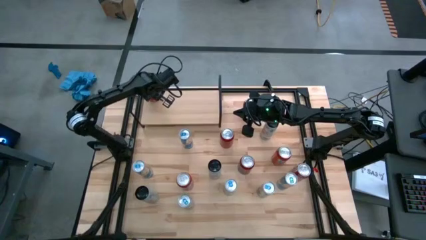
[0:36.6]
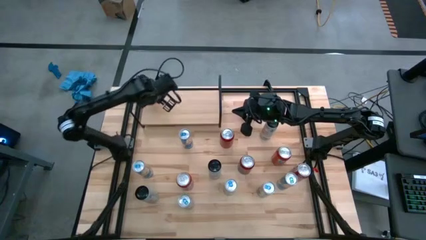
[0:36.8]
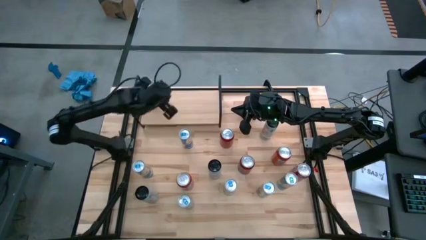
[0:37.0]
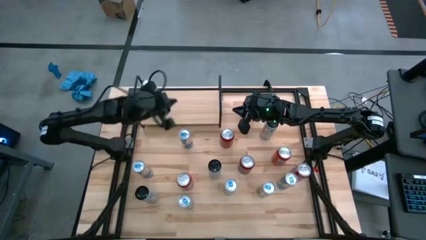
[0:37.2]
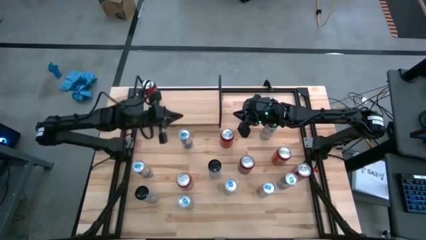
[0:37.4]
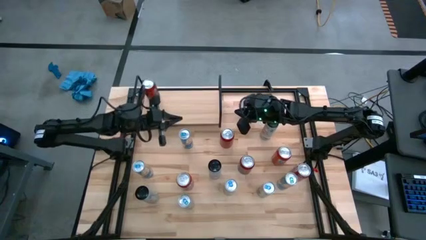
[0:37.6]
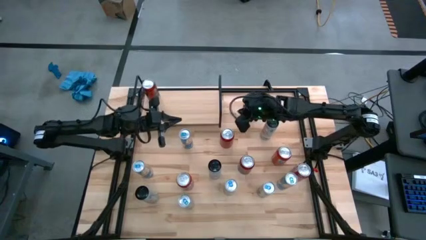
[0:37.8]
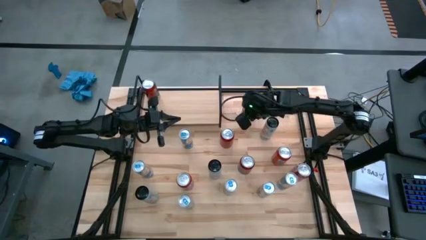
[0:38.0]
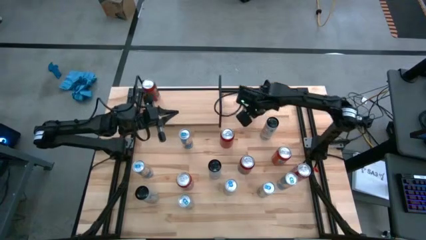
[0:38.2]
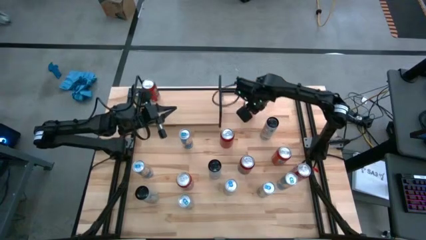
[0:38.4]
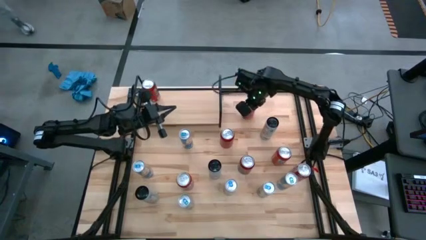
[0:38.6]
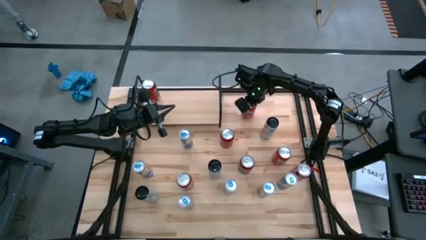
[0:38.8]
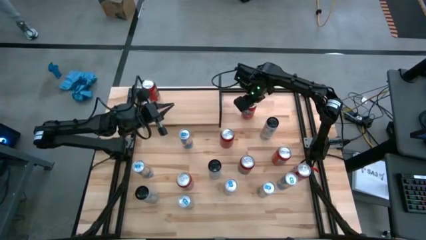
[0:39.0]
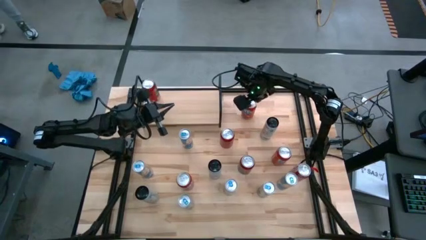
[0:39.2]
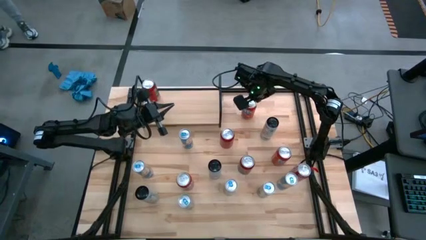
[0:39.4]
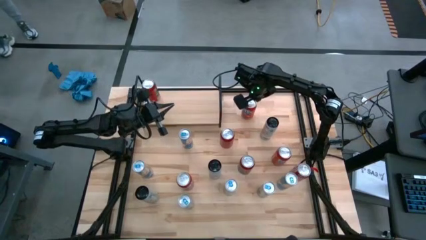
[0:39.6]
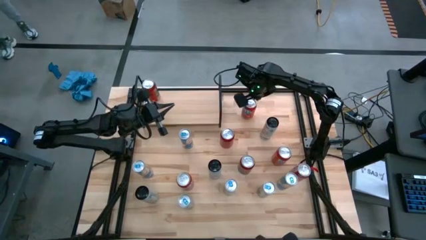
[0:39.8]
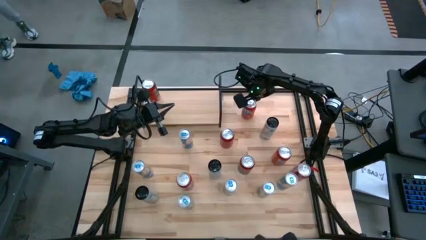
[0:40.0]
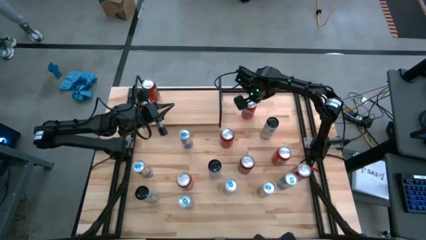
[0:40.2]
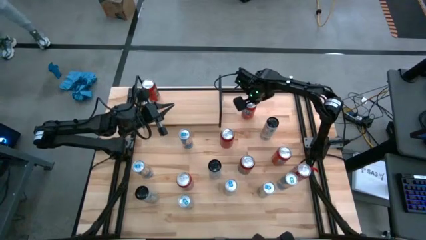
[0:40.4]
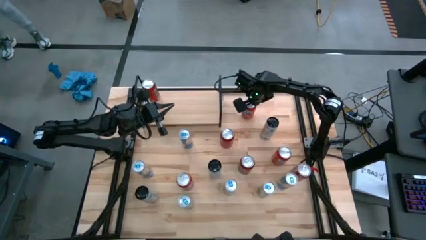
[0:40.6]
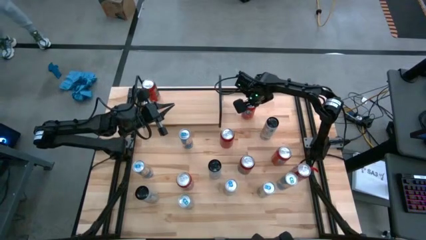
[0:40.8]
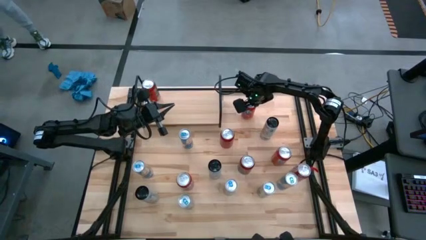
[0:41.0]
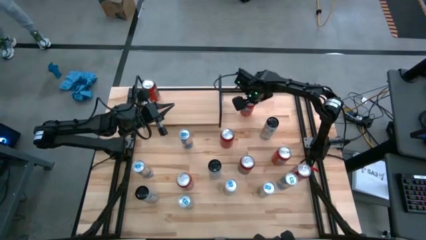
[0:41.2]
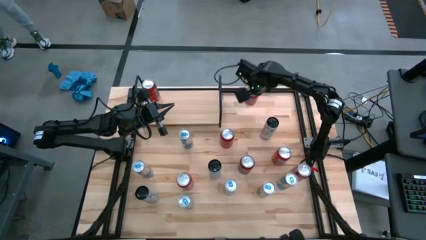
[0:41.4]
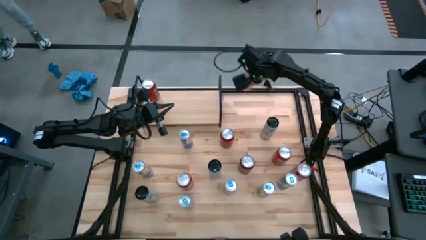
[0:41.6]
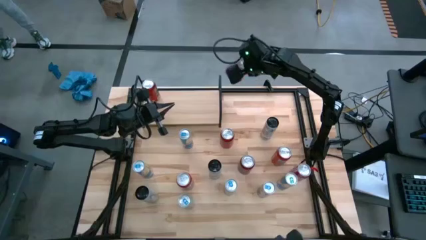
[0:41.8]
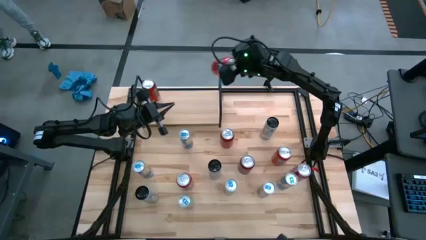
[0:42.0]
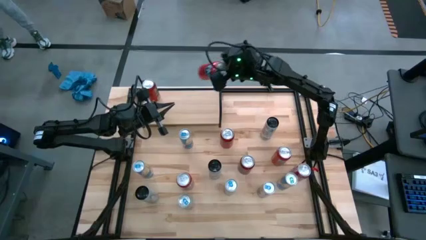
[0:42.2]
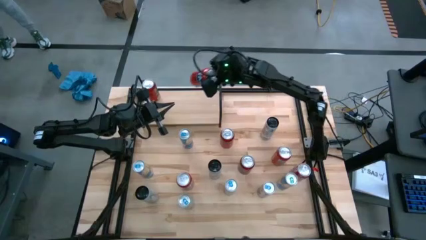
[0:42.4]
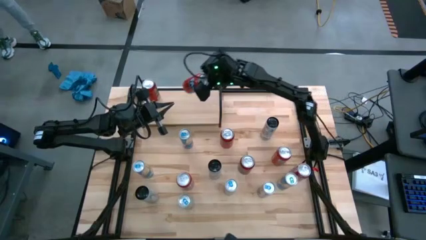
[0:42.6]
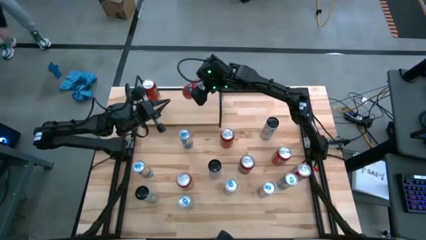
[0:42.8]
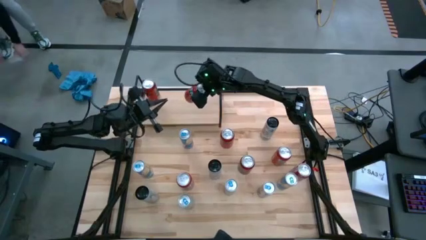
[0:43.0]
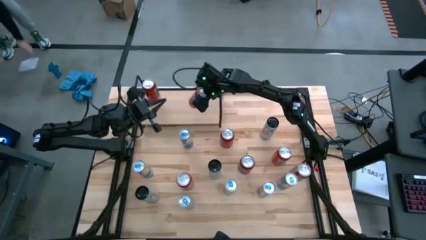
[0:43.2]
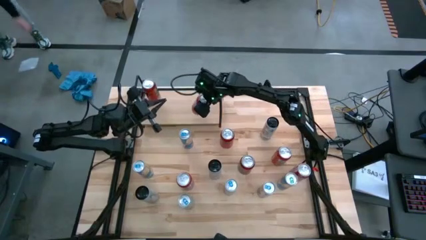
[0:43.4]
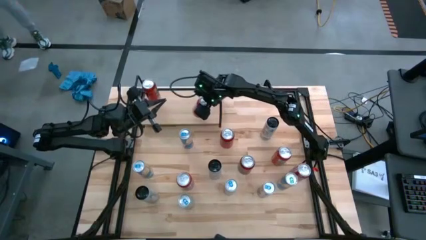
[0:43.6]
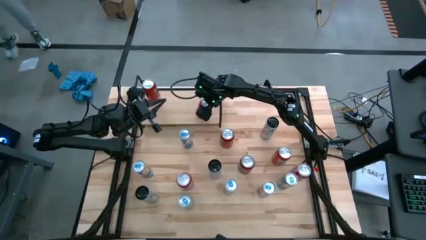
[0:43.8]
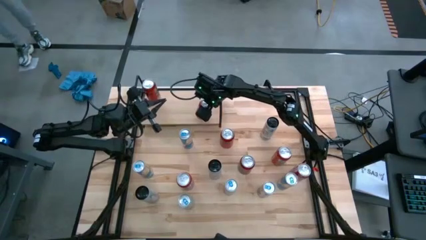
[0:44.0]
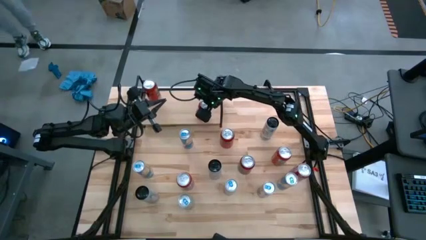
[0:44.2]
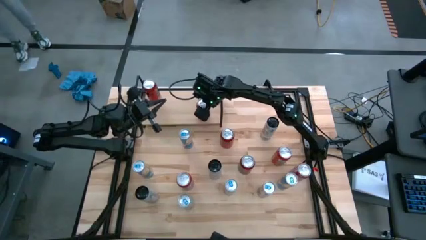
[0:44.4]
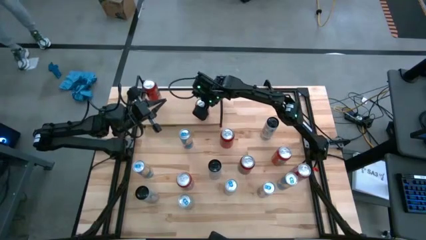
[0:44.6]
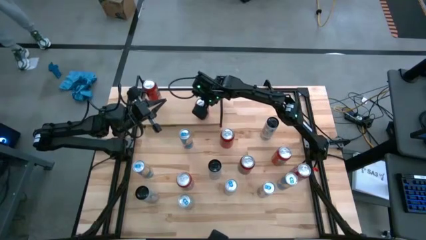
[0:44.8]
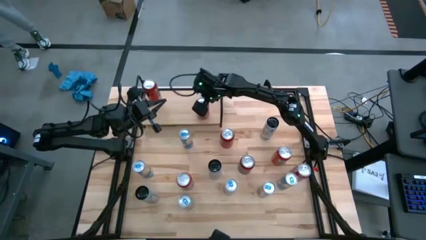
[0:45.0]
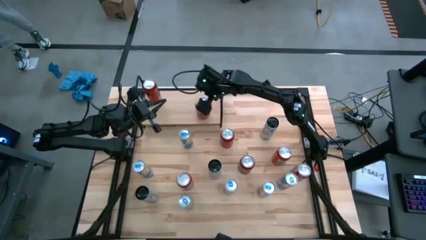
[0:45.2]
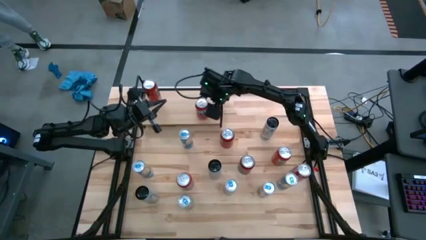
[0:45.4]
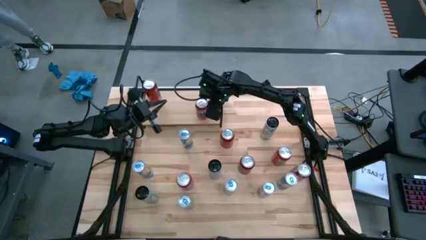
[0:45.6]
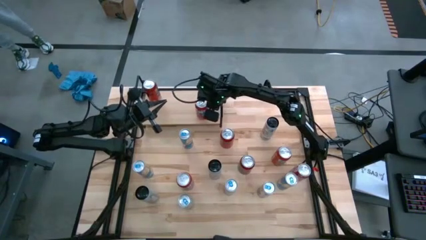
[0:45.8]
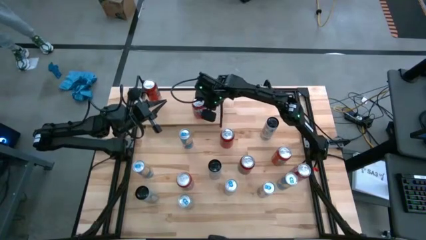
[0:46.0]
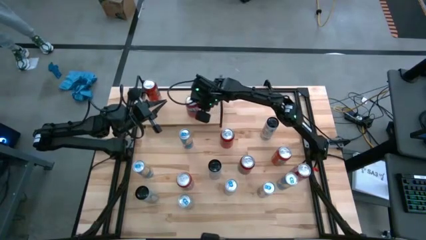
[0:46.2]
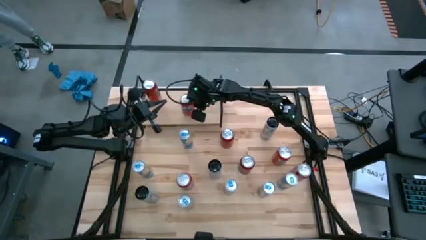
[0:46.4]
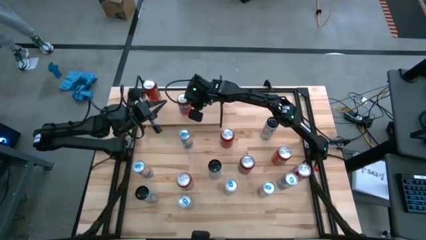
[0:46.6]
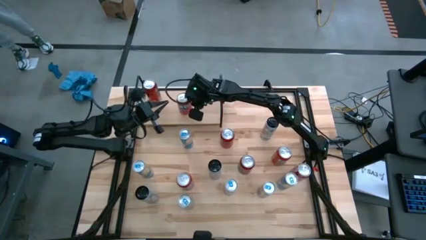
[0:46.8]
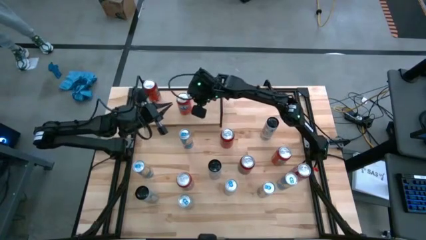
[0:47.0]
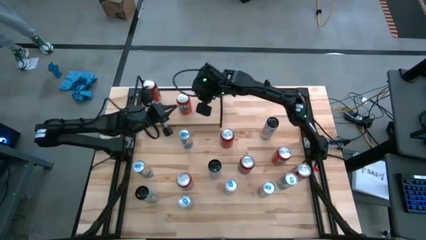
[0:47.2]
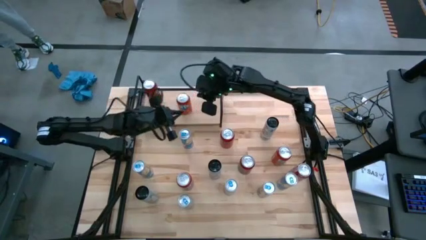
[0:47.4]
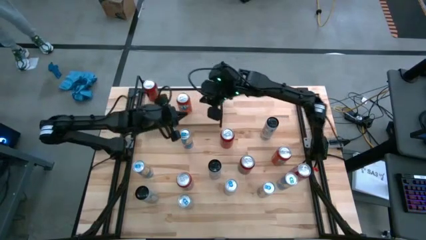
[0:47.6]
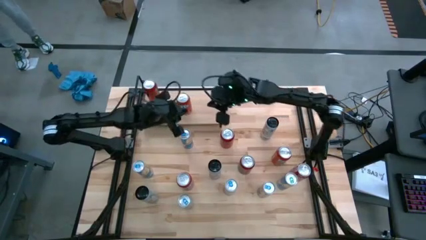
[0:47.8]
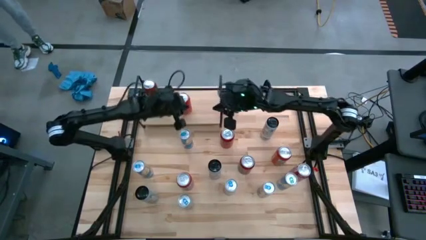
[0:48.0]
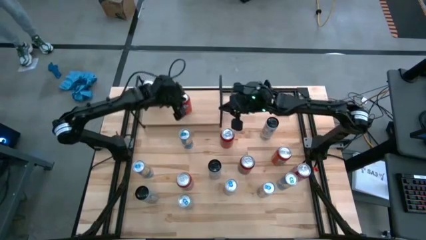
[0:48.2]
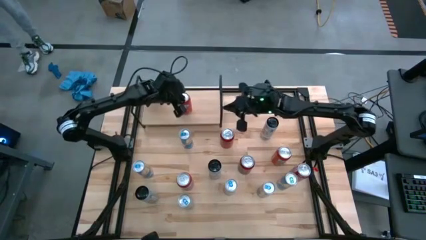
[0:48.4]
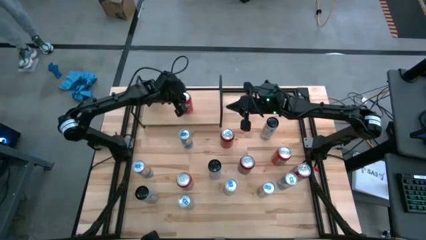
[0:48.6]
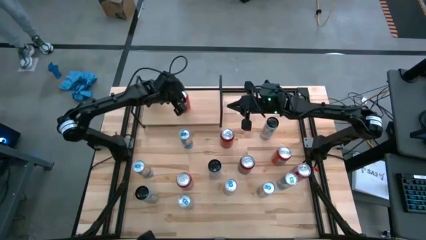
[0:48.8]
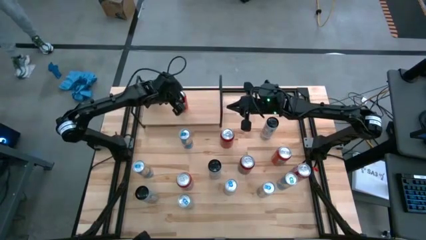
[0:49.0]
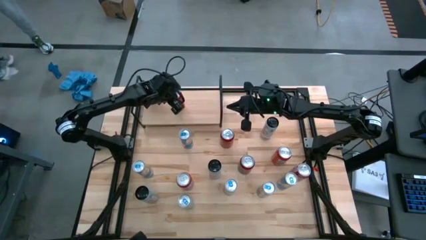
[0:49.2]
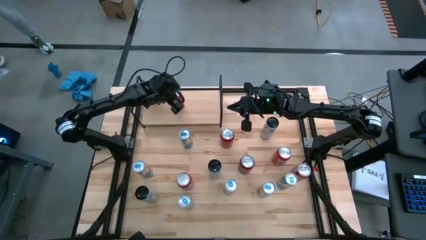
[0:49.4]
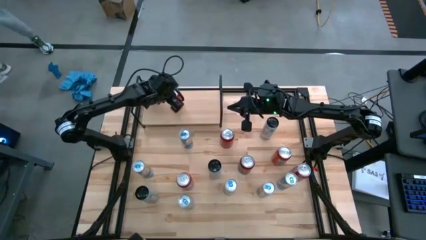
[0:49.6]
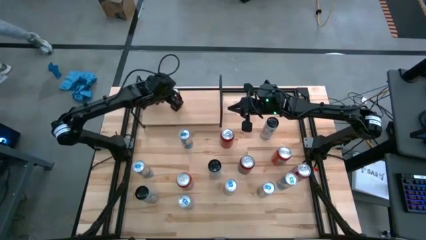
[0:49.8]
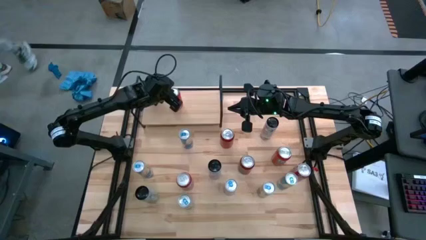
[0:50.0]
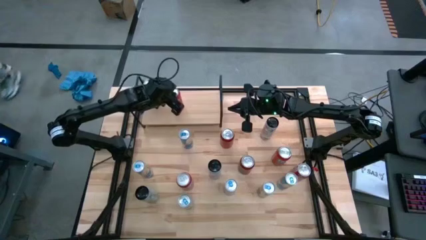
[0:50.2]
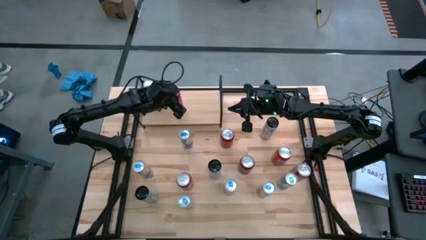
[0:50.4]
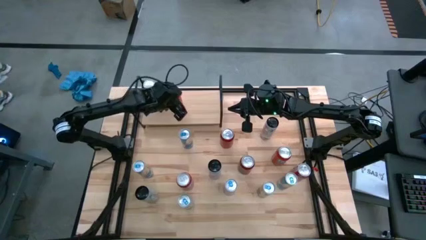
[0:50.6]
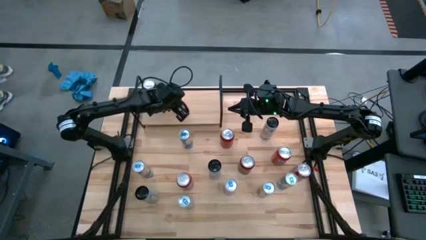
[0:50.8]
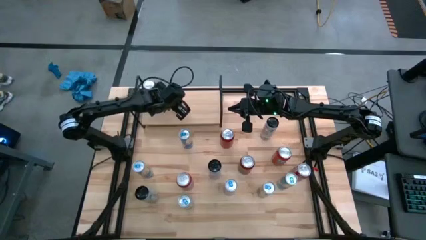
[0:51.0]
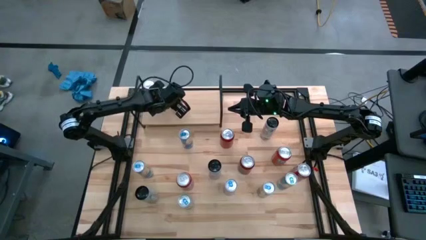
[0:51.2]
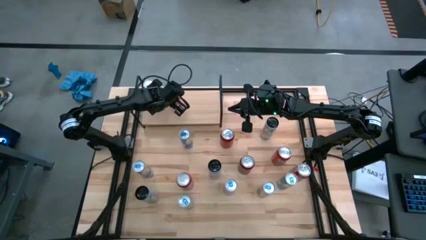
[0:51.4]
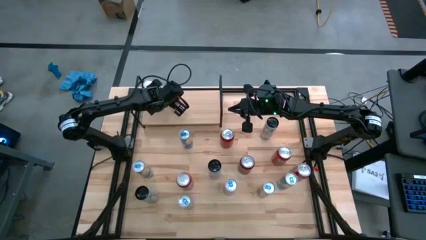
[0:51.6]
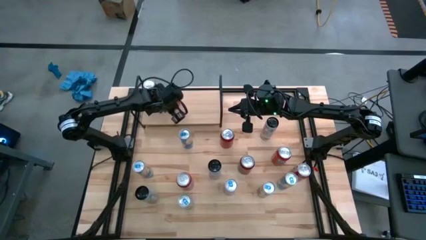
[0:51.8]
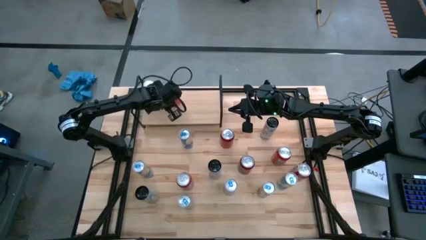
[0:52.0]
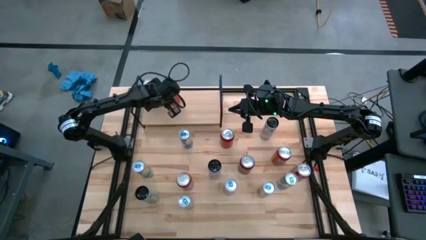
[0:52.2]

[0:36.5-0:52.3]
Task: Place canned beverage on shelf
Put the red soda can on the shelf
